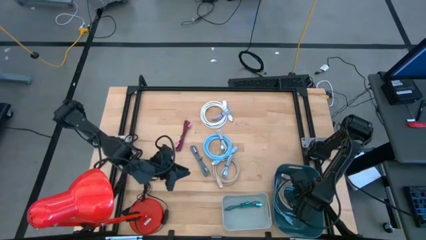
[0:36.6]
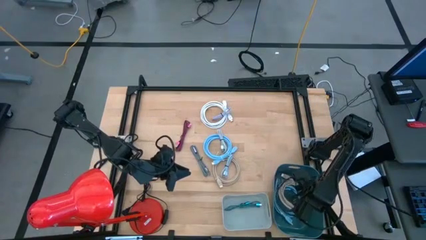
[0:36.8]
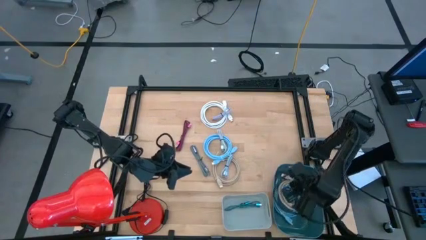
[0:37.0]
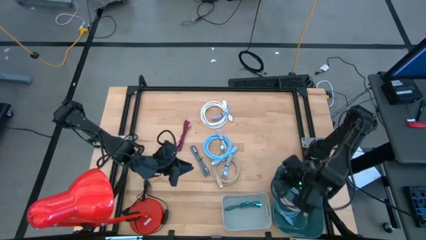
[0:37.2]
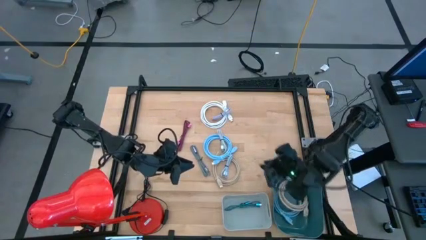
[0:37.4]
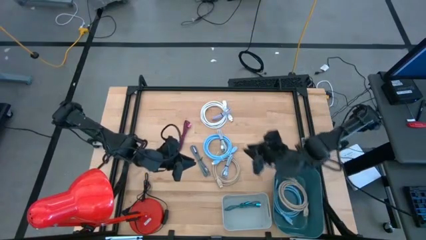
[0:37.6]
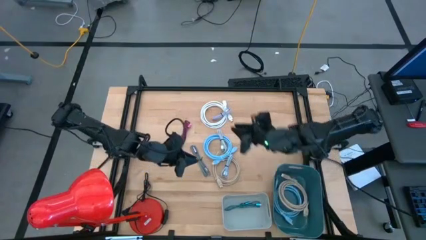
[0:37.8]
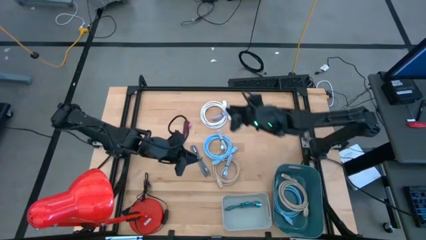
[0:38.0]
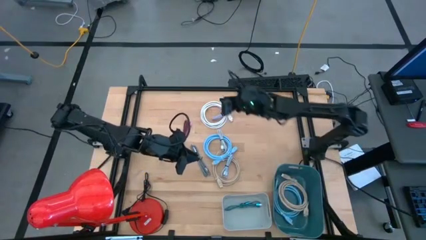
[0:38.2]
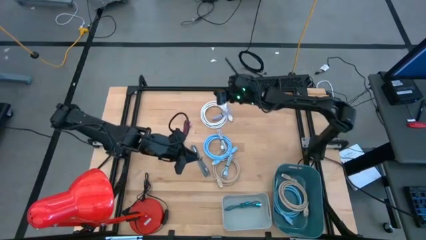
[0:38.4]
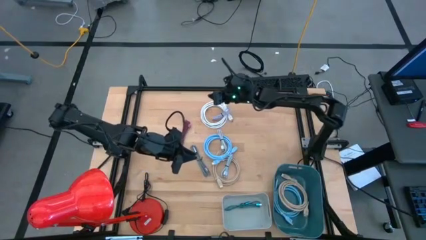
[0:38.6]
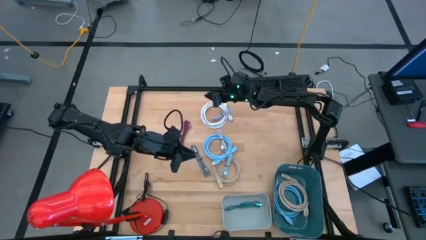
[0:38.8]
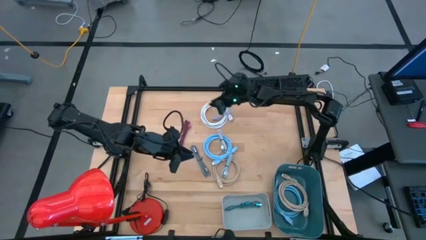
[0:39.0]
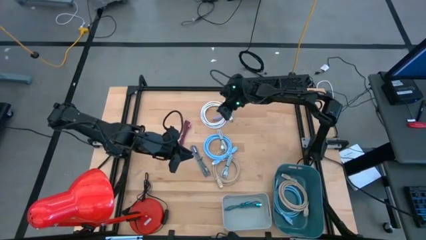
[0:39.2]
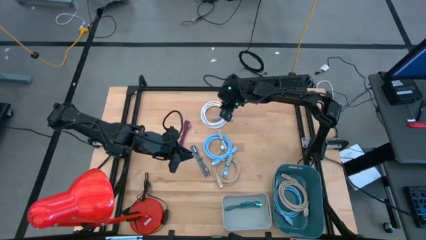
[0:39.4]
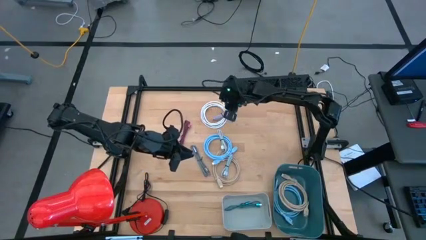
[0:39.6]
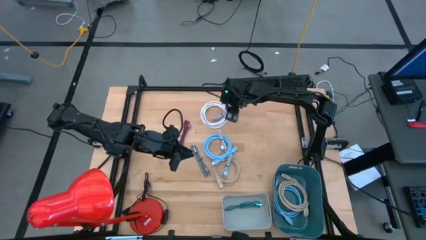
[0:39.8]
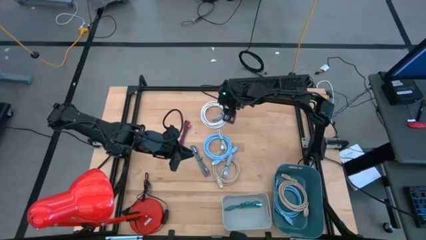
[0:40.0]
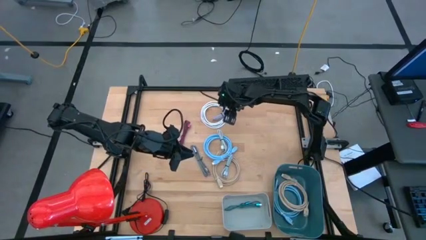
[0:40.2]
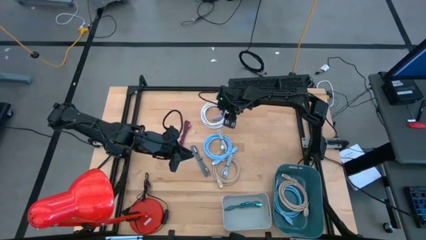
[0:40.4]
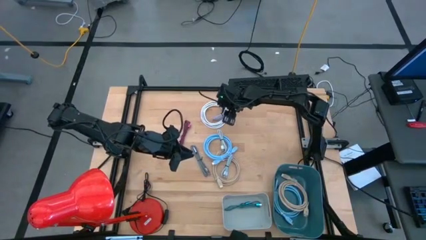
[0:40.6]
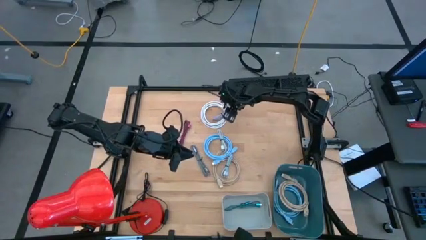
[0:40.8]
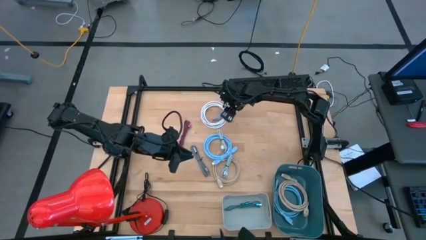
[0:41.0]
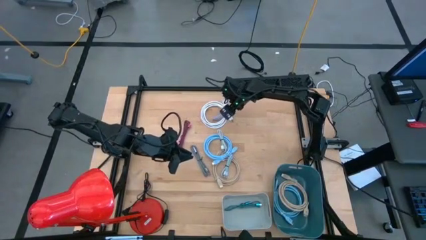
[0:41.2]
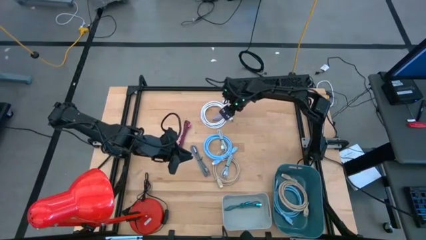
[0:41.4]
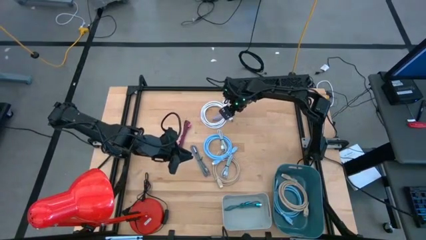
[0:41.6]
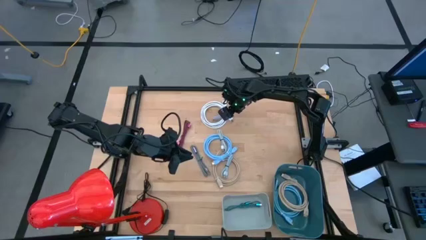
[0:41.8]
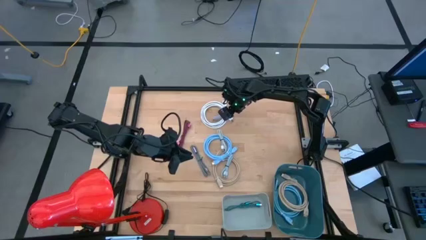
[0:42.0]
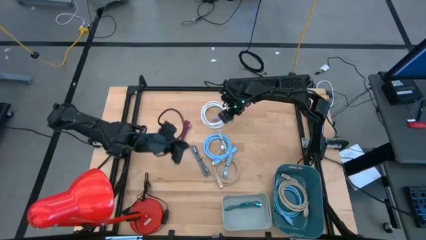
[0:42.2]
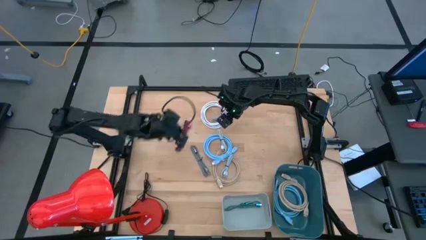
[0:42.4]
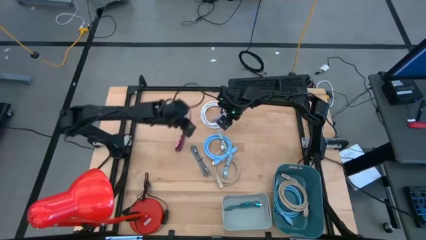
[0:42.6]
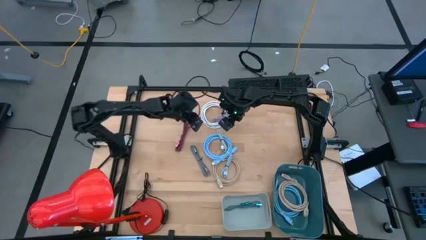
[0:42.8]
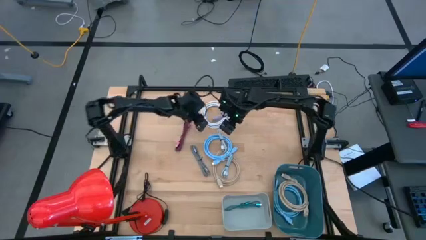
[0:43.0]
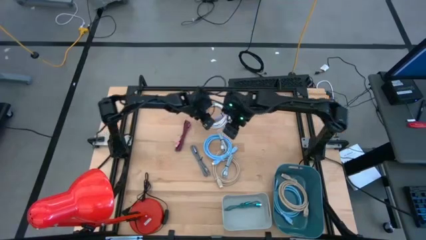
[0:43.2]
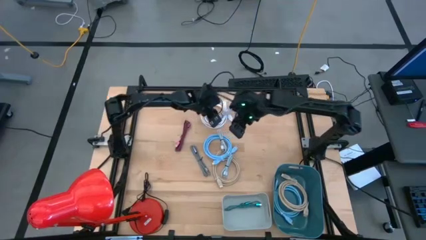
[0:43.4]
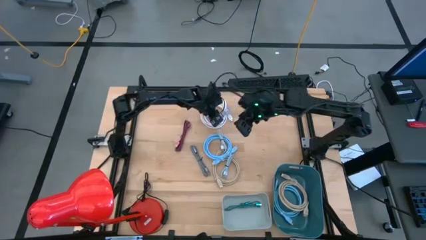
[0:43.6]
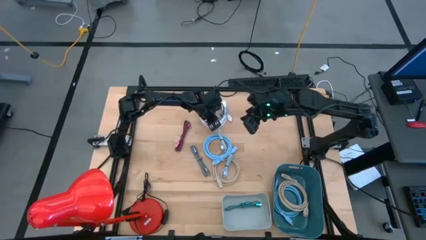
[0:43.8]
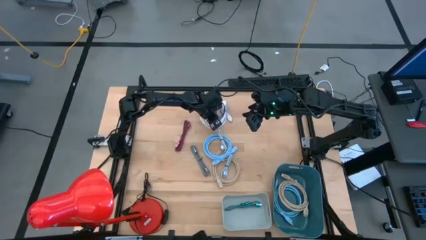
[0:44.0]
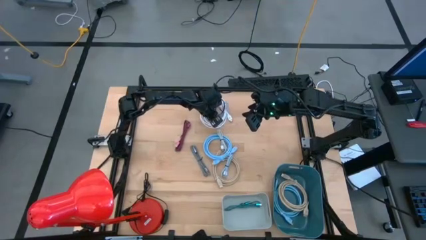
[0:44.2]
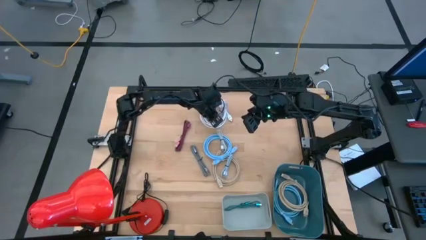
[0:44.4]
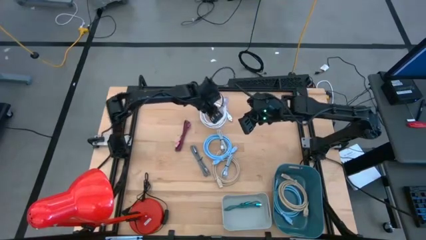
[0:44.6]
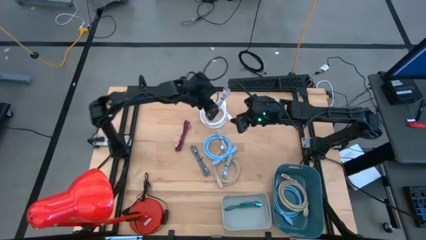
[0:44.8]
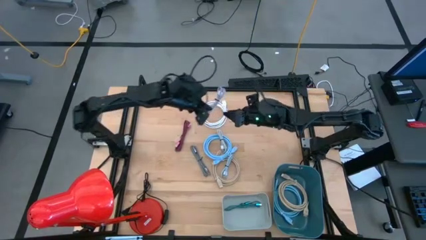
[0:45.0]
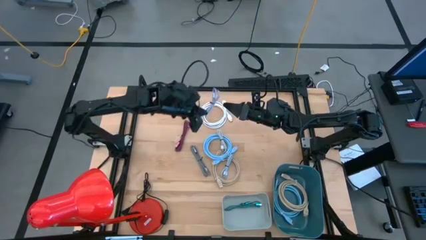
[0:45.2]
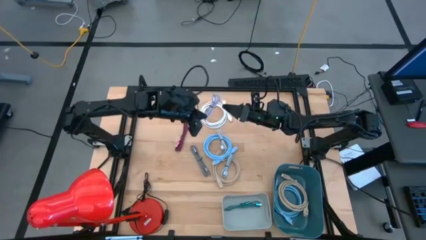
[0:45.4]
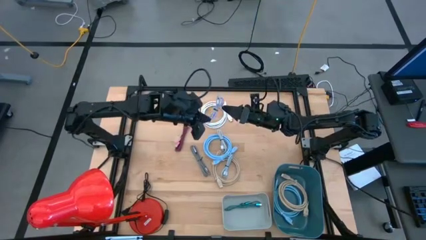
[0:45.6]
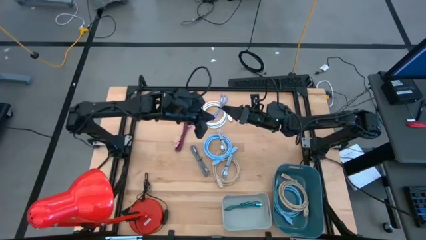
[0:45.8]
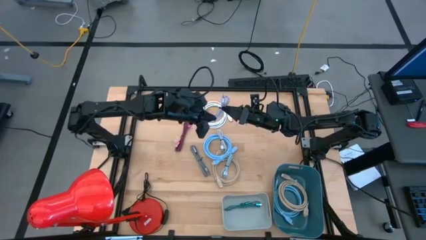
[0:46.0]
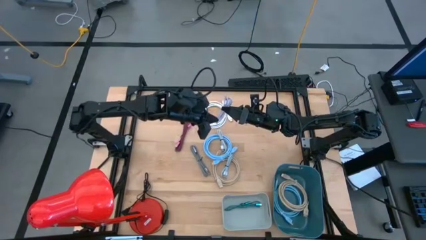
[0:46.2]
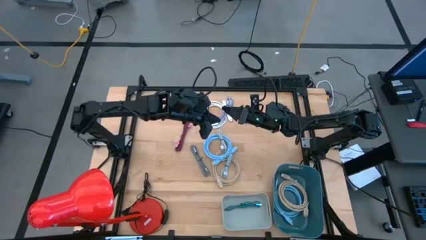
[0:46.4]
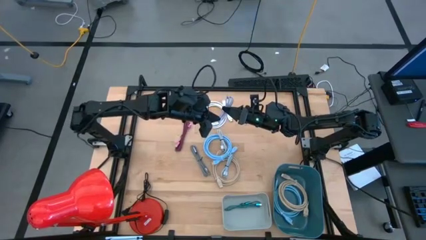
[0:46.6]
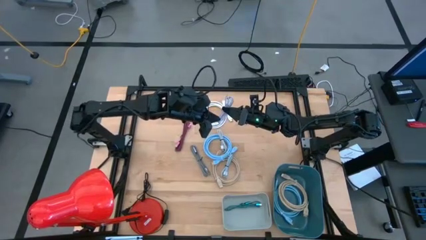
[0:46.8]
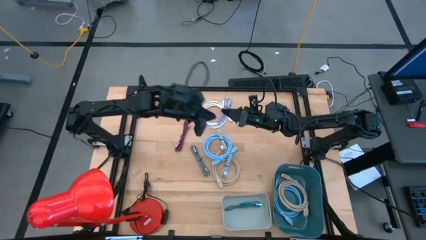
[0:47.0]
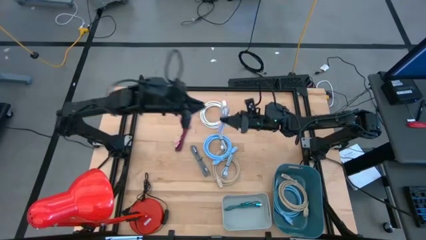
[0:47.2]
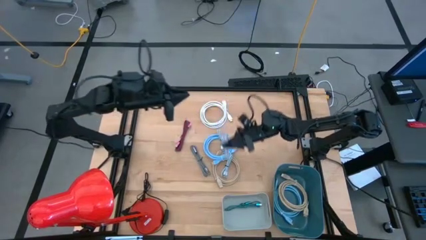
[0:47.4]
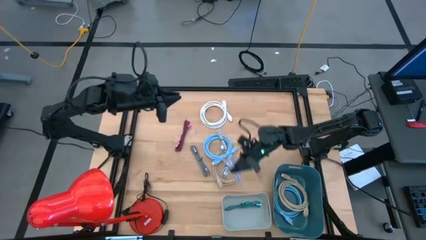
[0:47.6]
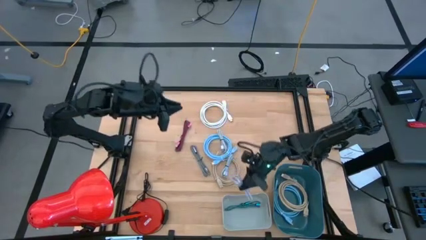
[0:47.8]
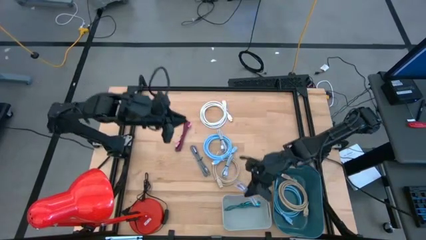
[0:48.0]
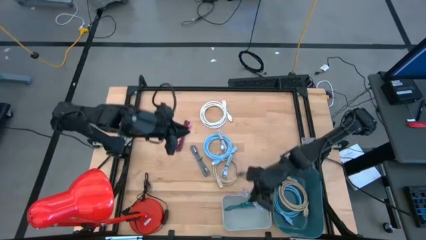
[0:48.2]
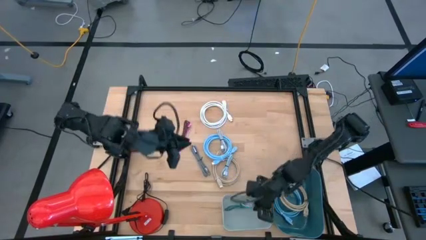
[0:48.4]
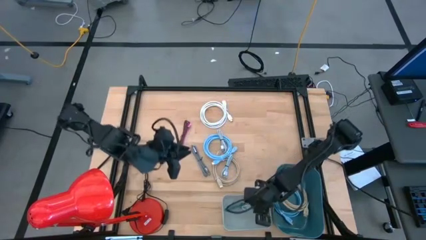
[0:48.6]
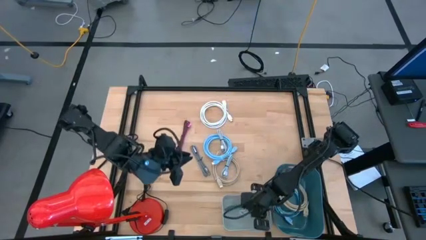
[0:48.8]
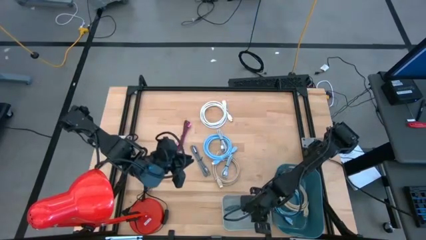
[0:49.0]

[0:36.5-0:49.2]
Task: Pick & Place USB Port
Put the gray and white USB cable into the gray bin
